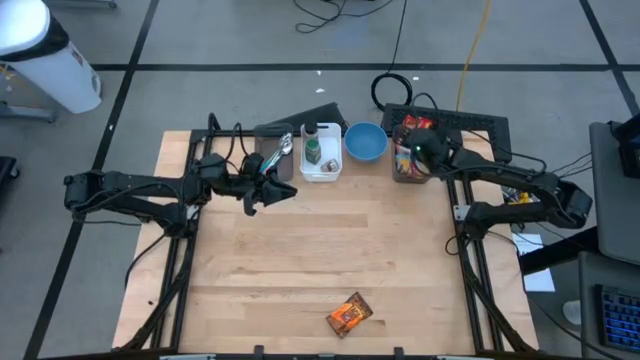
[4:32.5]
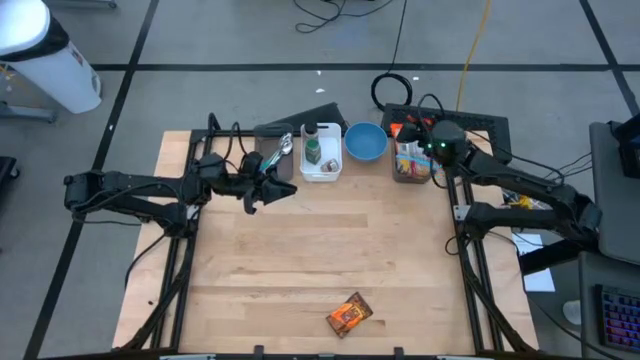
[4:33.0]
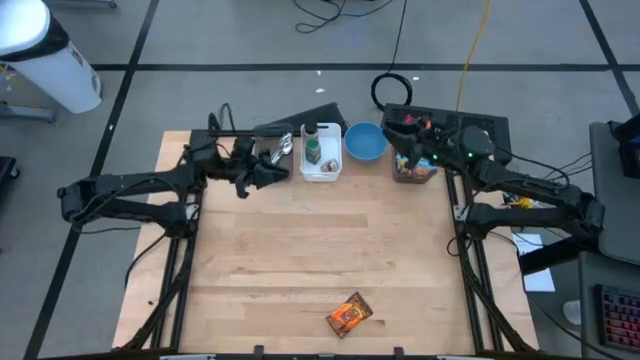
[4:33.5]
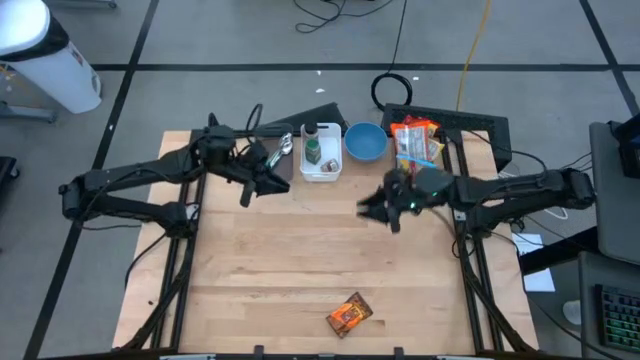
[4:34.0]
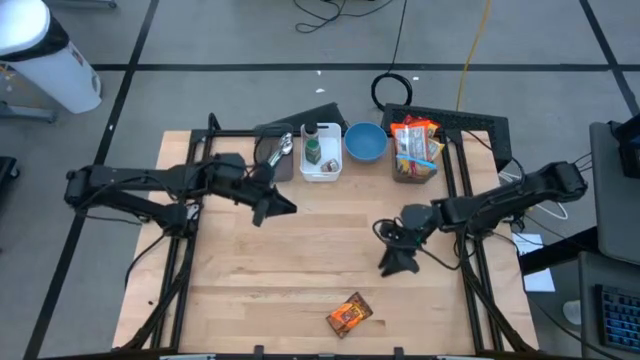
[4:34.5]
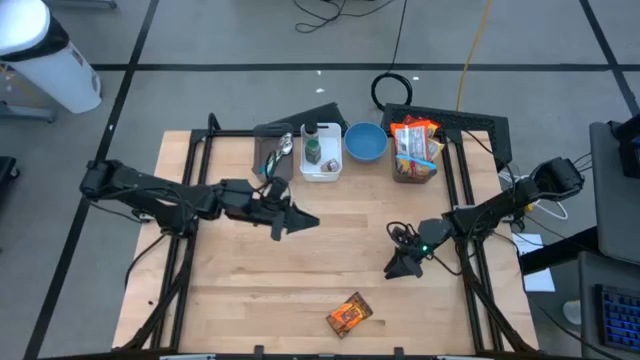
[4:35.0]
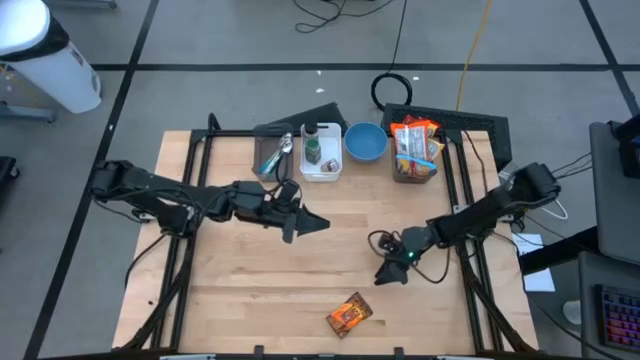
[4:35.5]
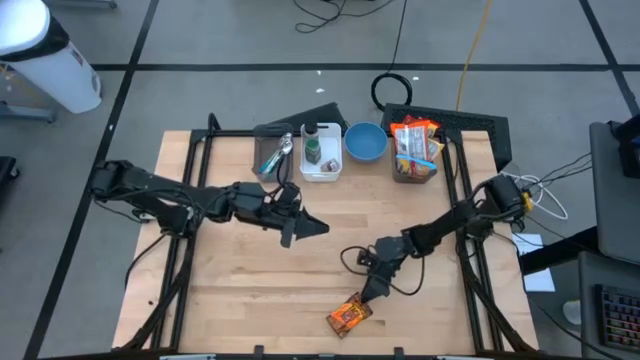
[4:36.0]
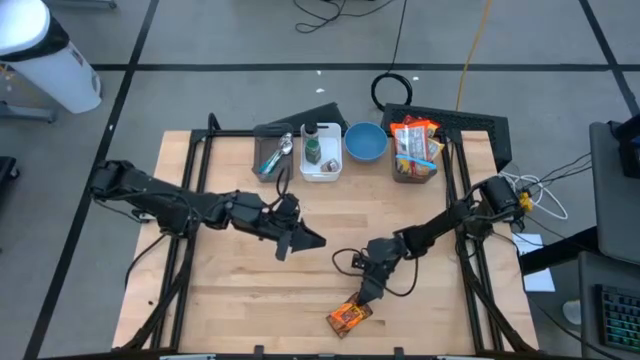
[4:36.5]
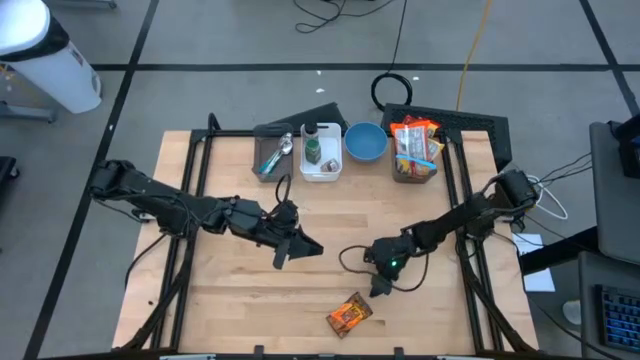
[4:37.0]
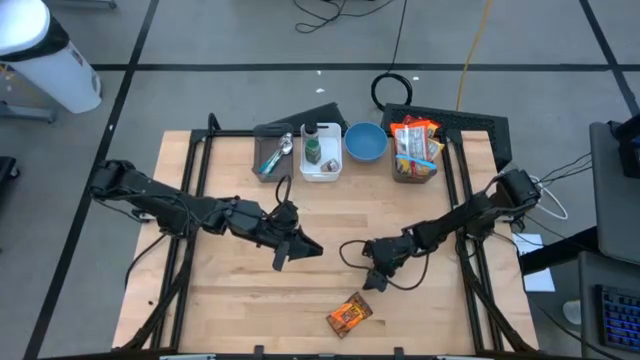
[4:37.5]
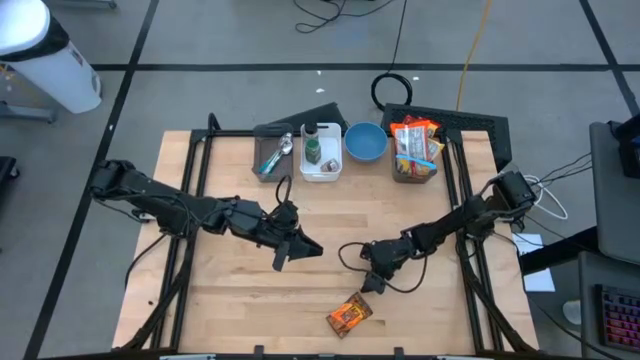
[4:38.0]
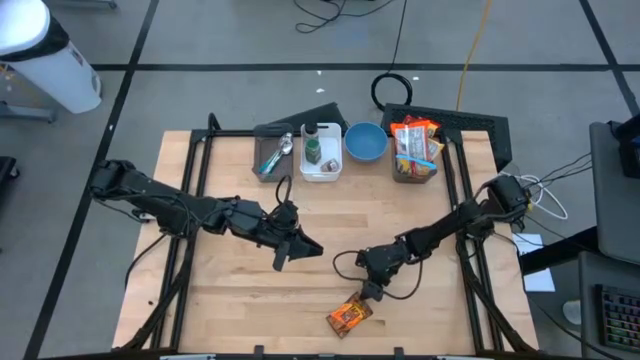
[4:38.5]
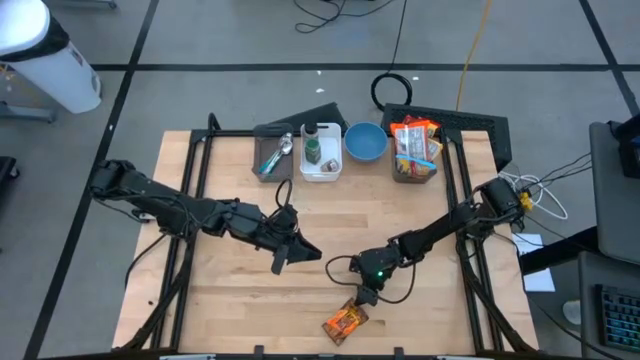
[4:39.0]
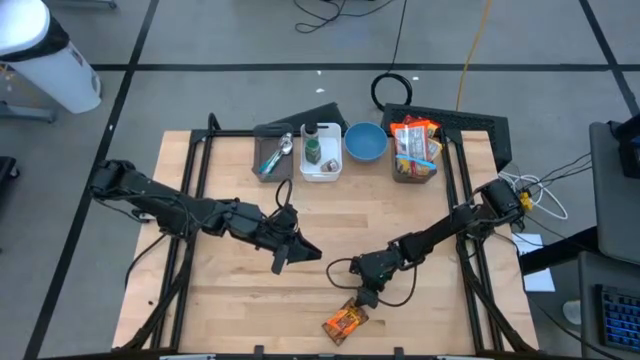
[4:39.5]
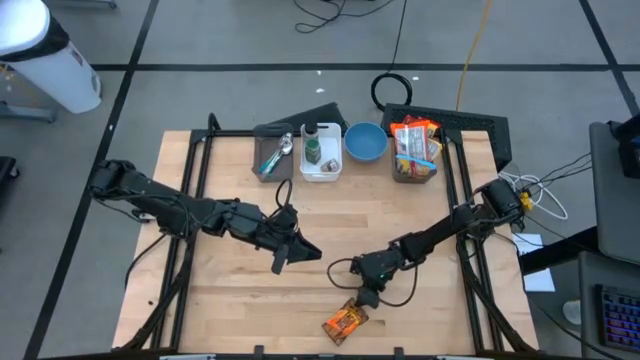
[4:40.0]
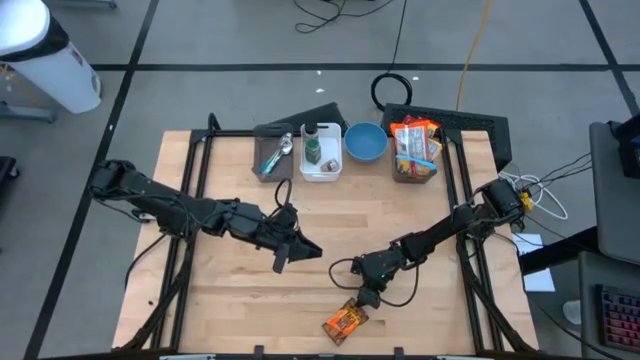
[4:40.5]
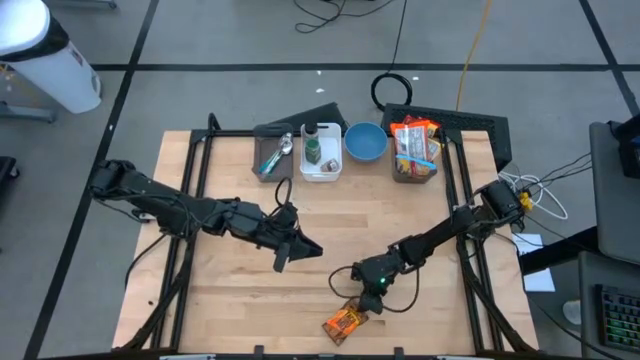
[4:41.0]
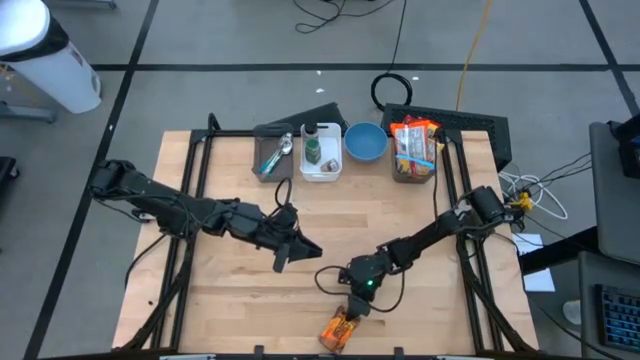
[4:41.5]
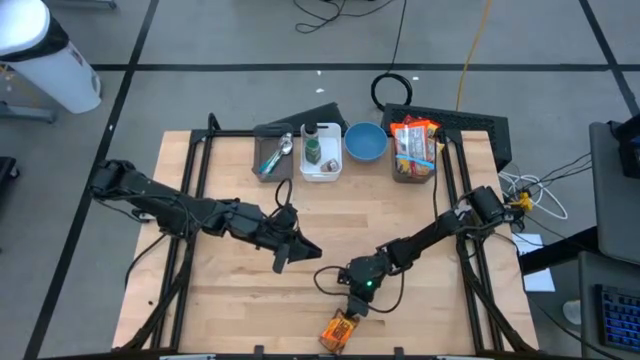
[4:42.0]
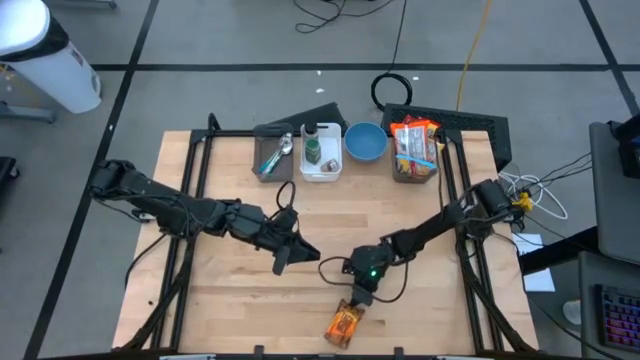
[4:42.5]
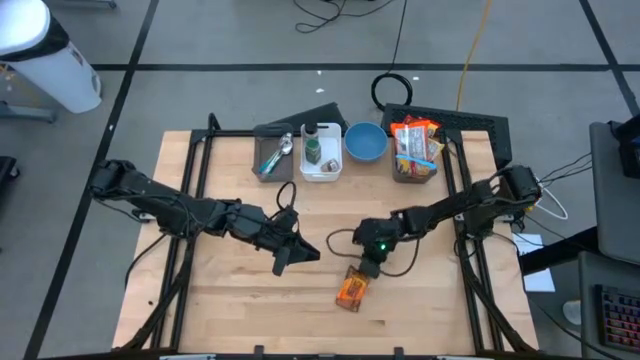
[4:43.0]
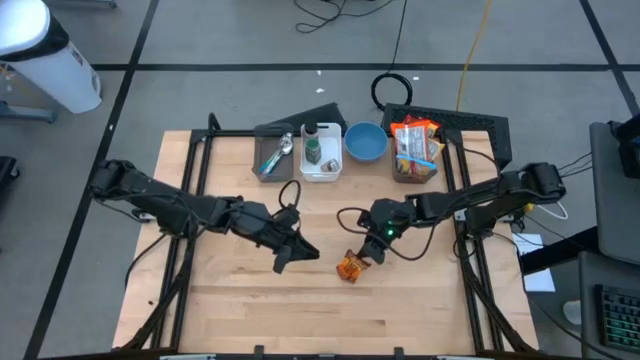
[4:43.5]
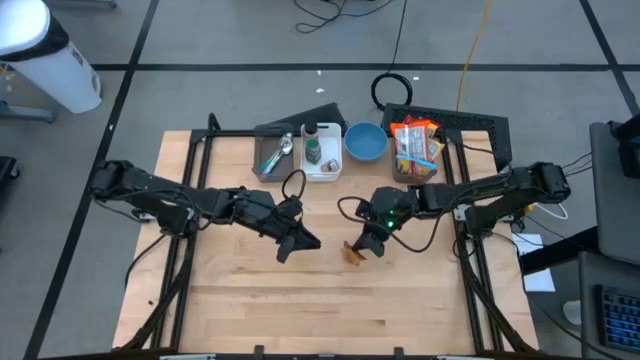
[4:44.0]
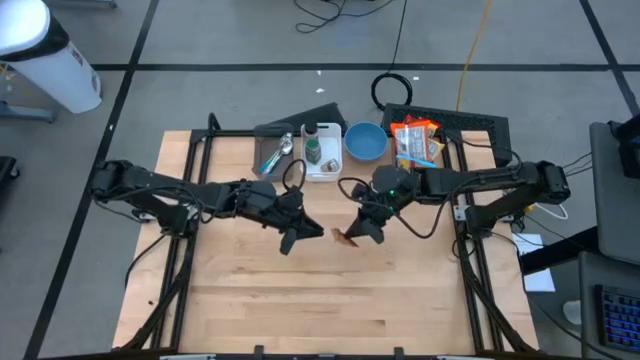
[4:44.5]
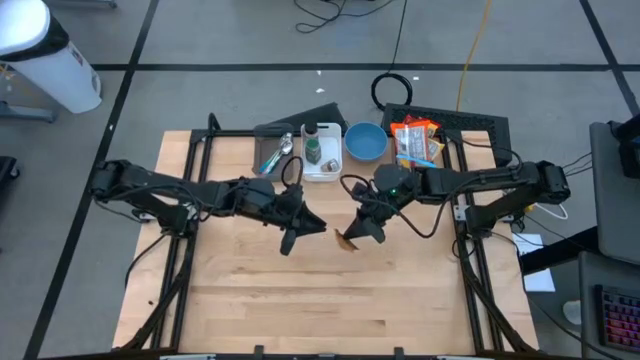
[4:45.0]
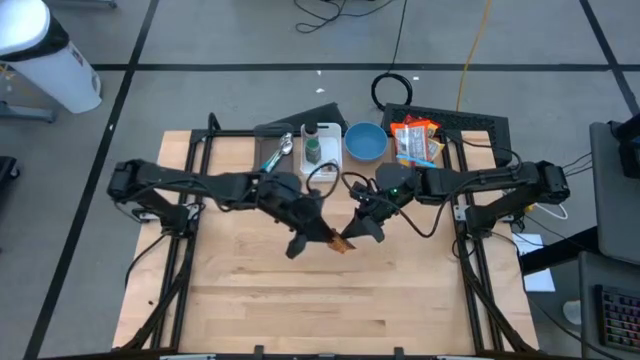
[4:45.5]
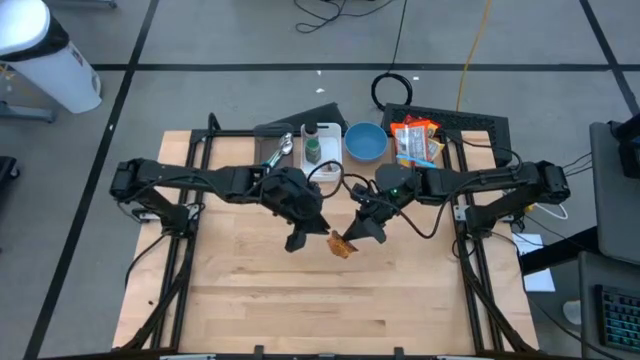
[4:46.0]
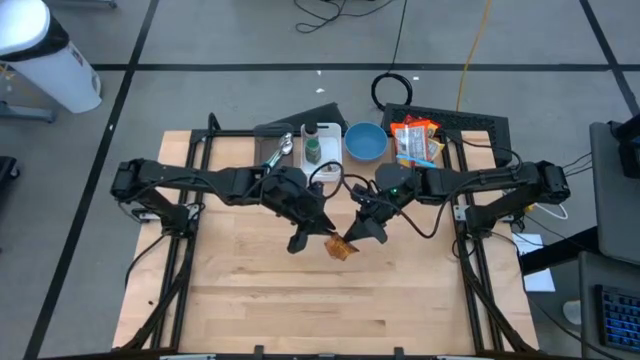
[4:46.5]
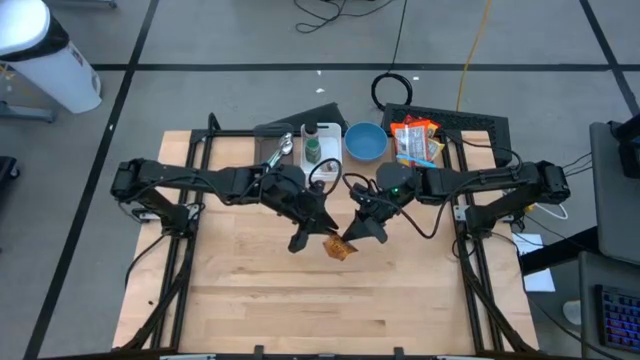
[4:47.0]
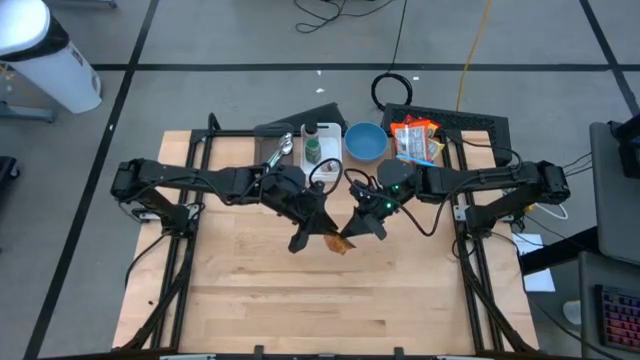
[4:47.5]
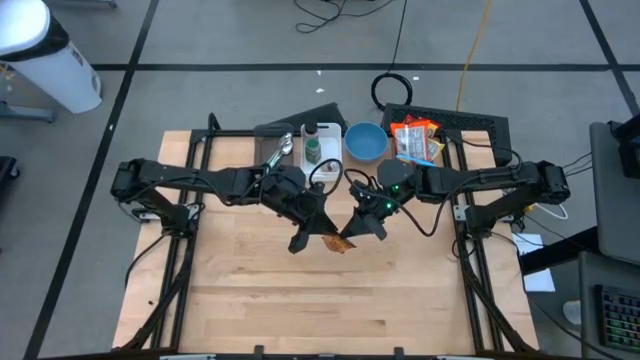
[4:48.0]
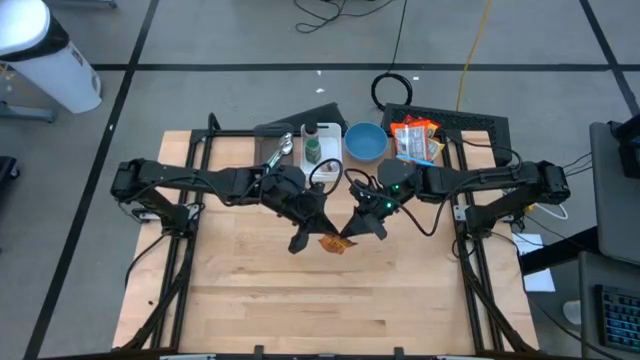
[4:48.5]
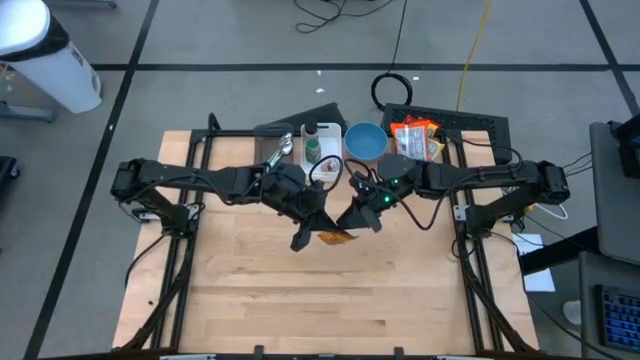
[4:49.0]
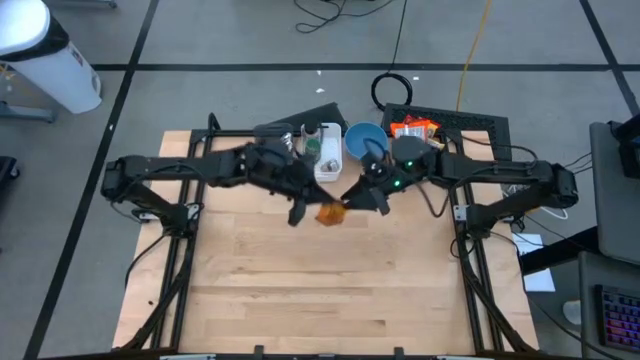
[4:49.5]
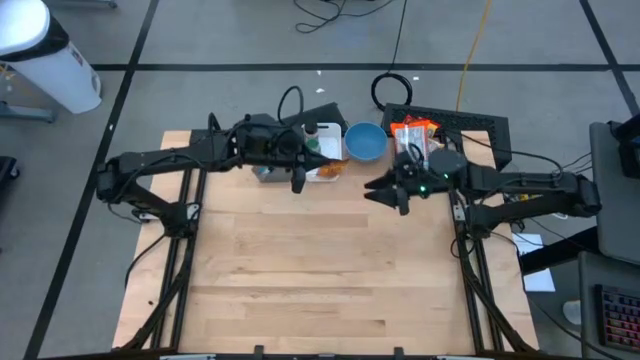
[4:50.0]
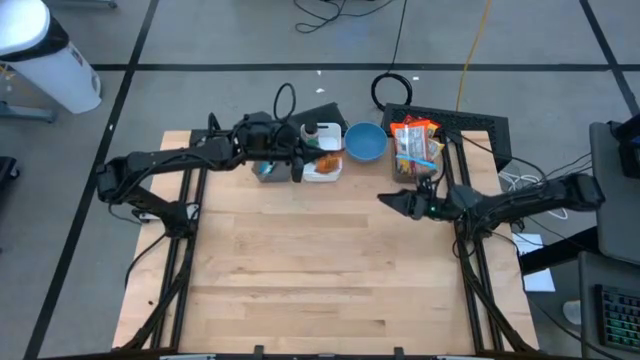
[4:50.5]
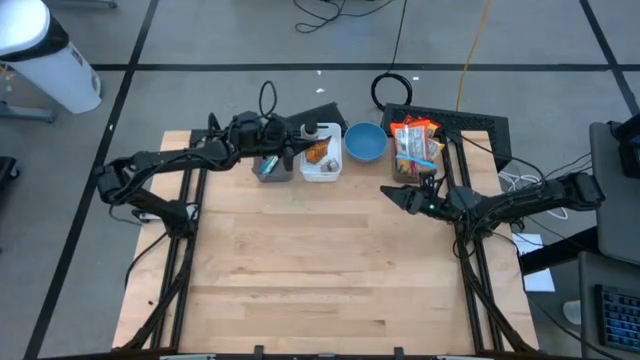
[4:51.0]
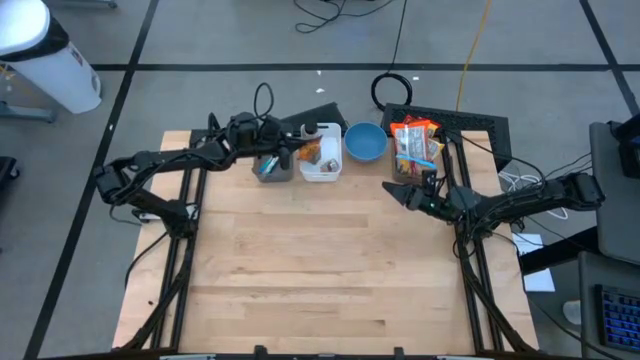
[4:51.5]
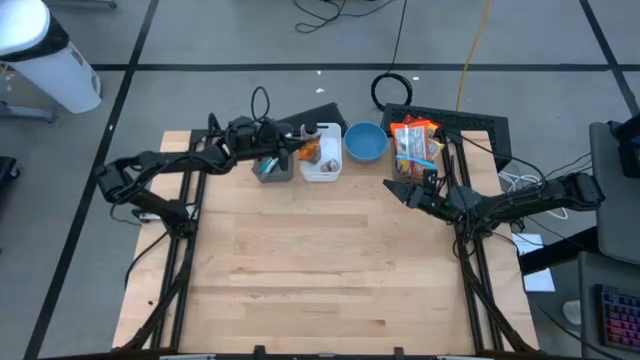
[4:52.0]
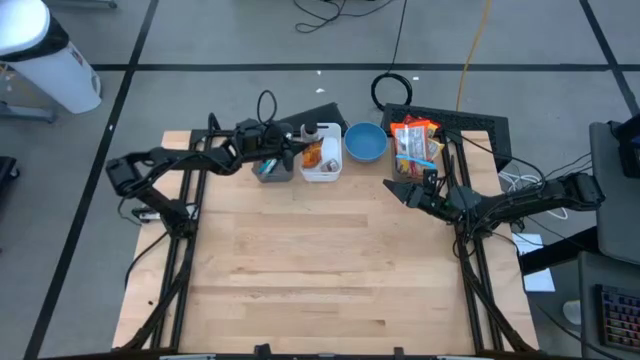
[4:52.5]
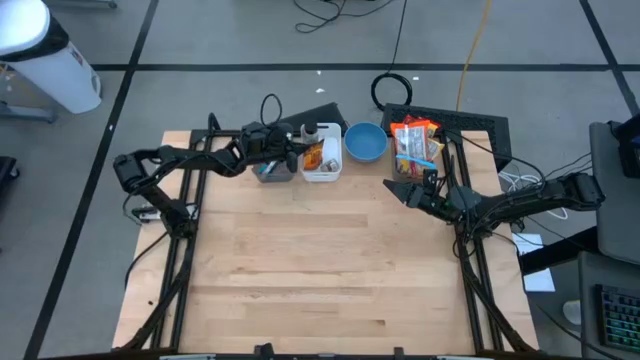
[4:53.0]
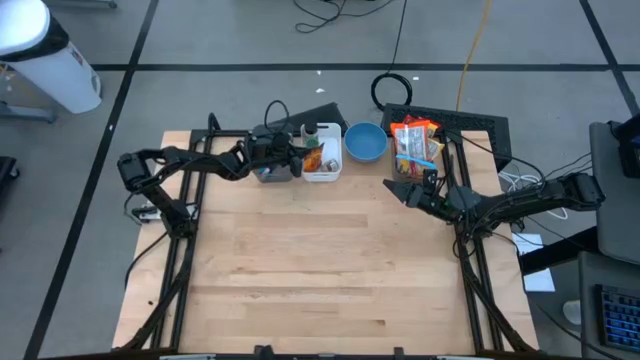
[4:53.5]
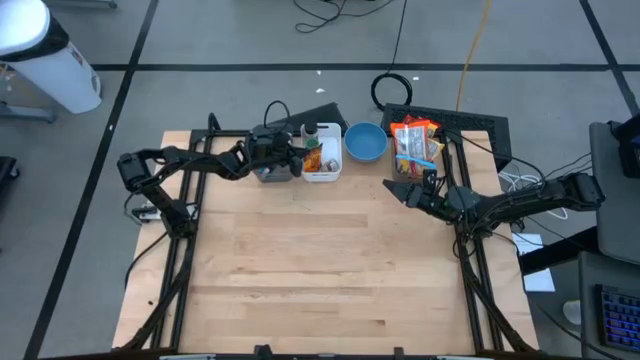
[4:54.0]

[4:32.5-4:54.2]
Task: Pick & Place Food Item
Put the brown seasoning bag into the white bin
